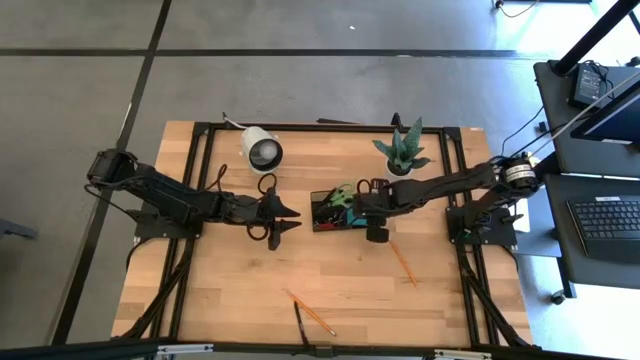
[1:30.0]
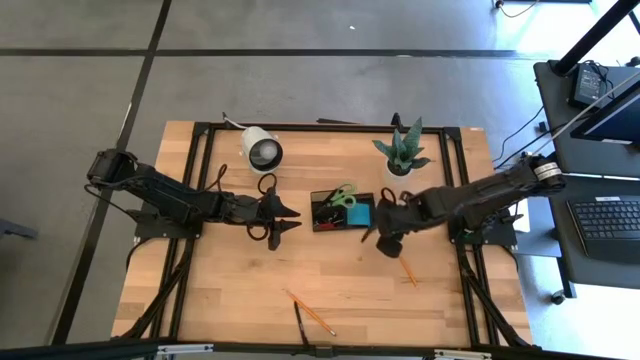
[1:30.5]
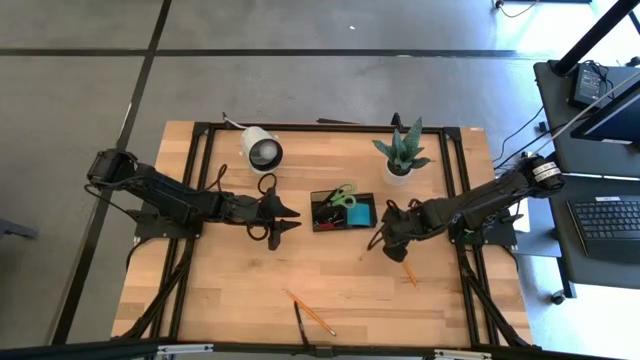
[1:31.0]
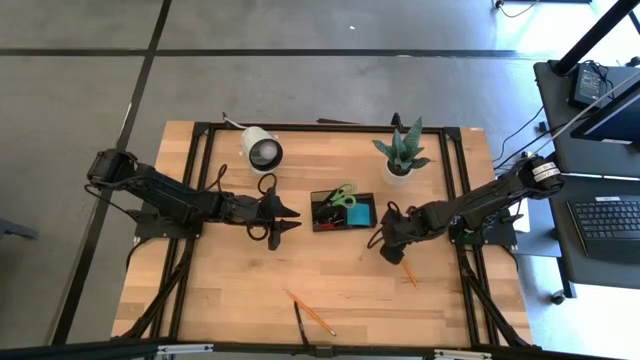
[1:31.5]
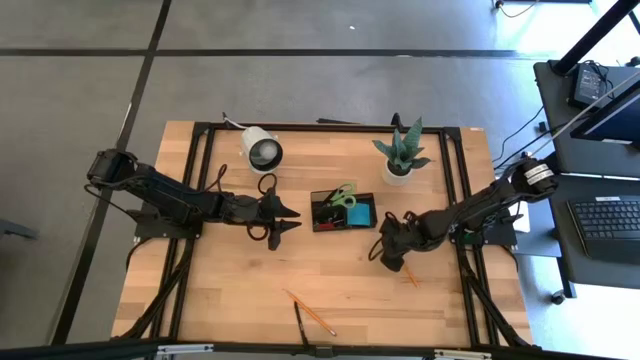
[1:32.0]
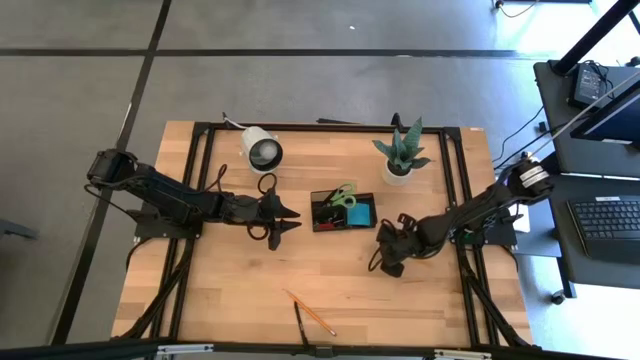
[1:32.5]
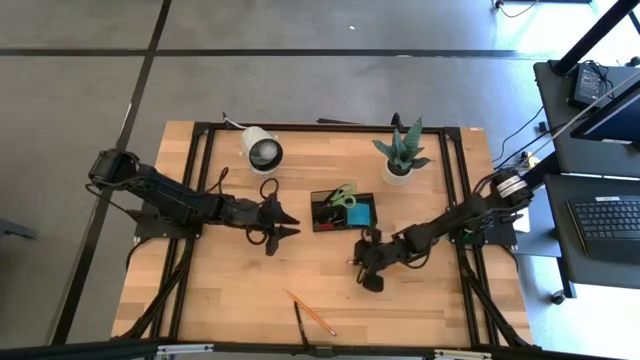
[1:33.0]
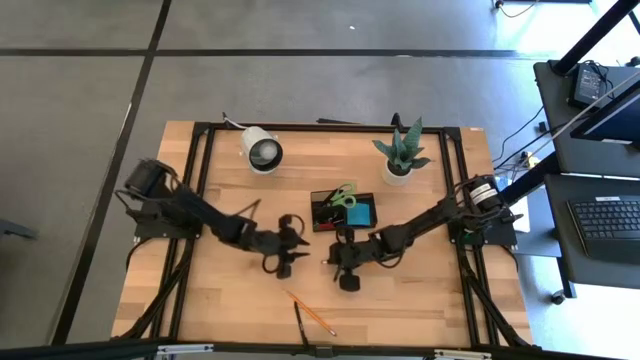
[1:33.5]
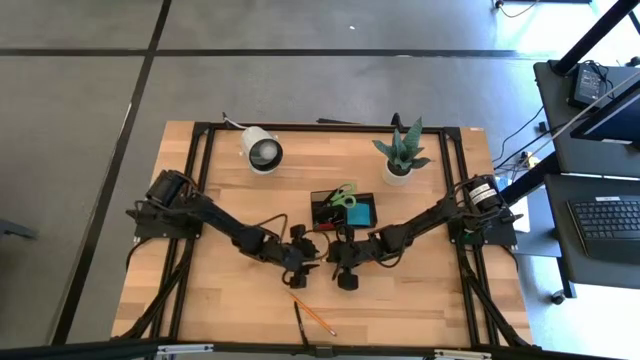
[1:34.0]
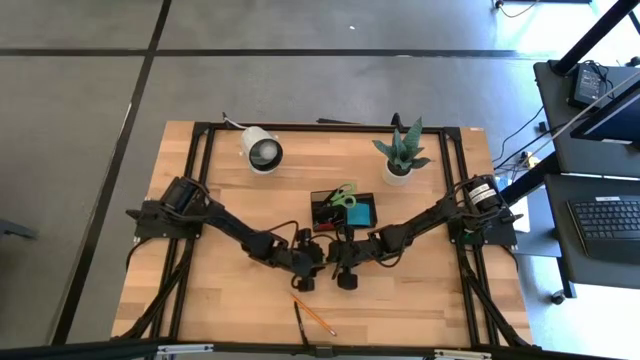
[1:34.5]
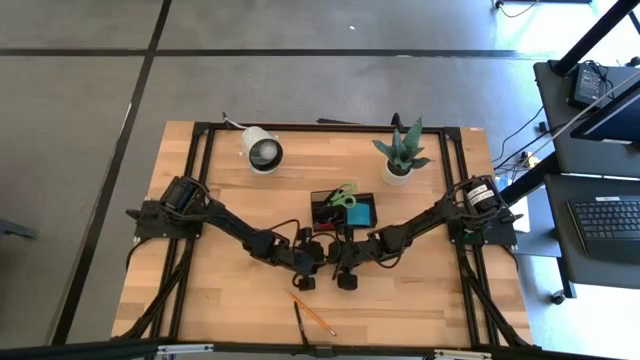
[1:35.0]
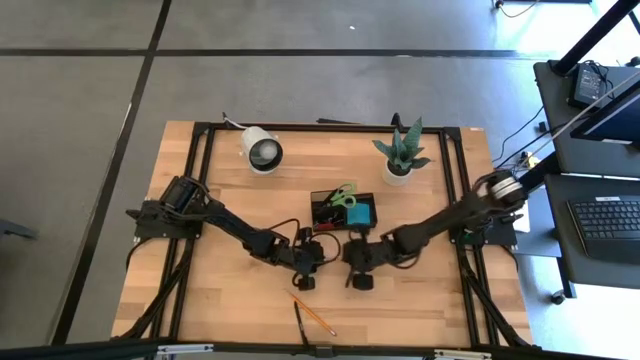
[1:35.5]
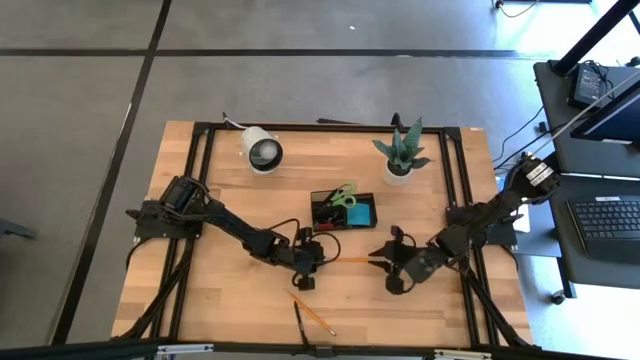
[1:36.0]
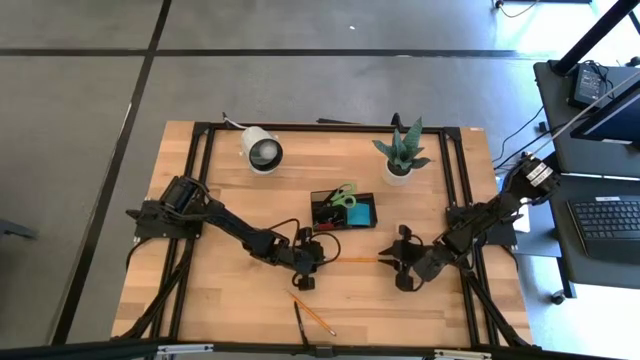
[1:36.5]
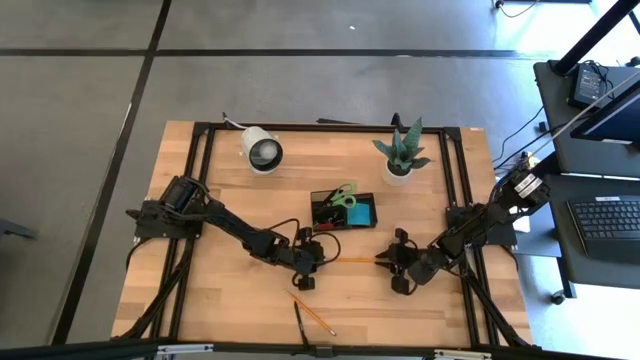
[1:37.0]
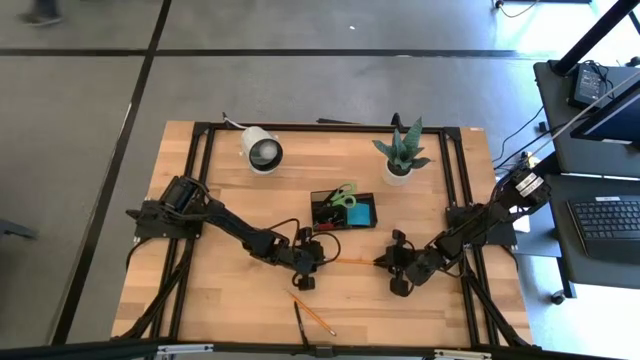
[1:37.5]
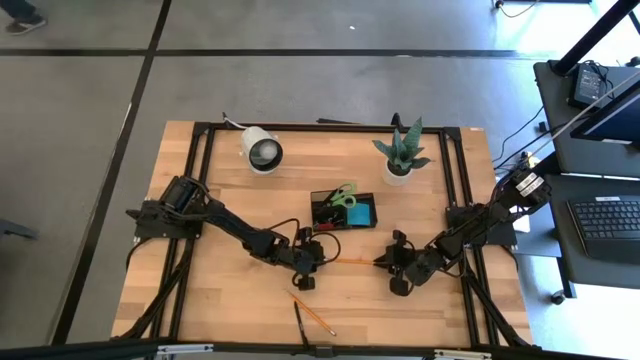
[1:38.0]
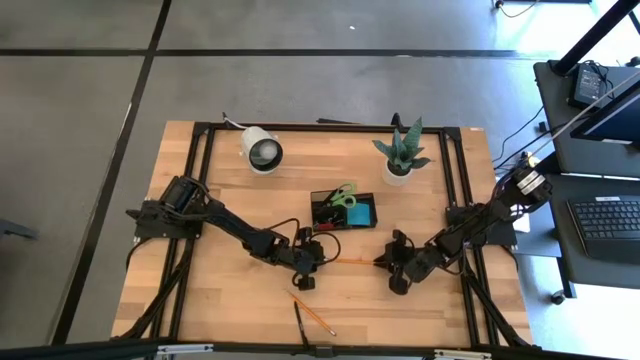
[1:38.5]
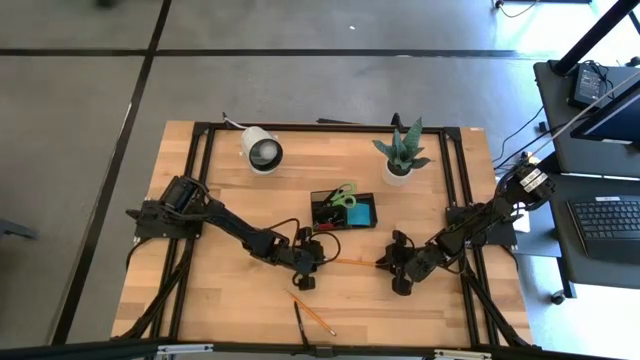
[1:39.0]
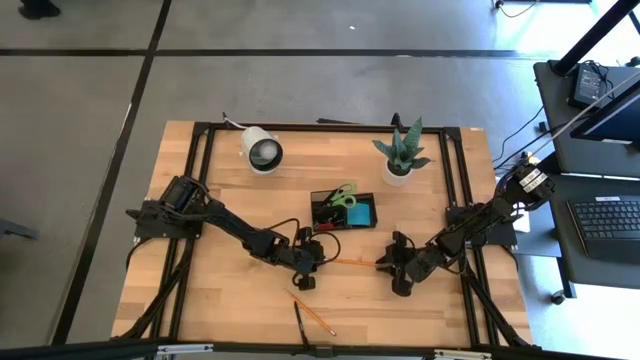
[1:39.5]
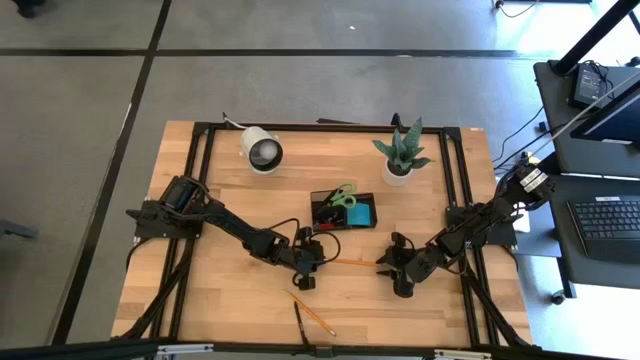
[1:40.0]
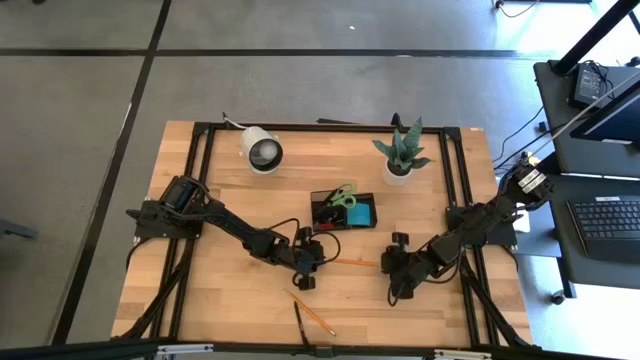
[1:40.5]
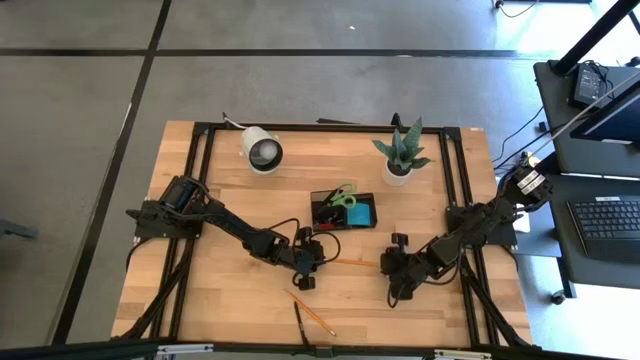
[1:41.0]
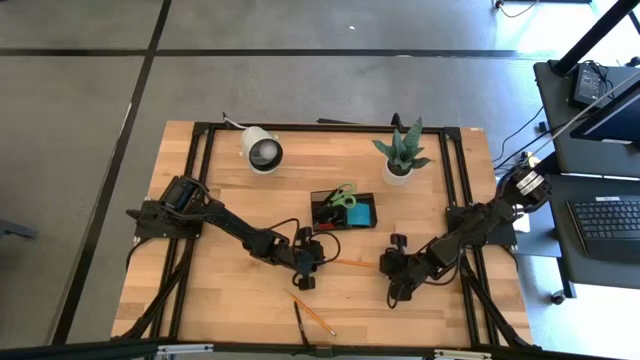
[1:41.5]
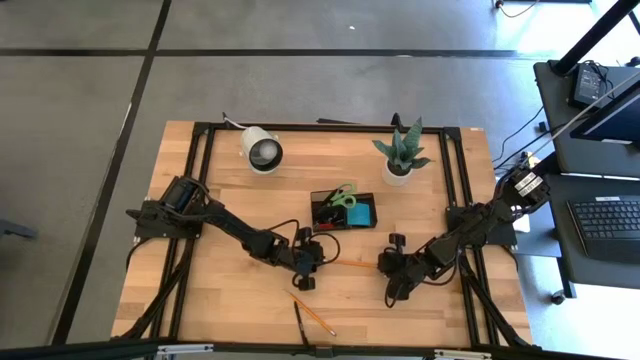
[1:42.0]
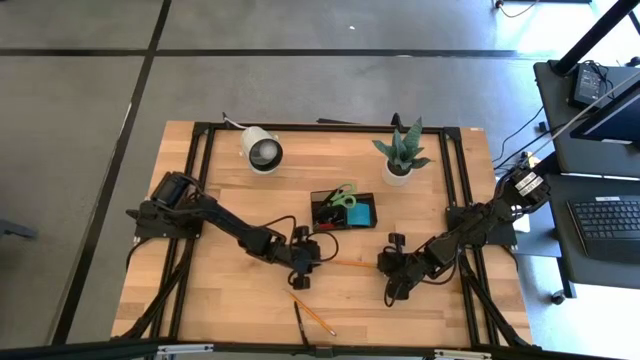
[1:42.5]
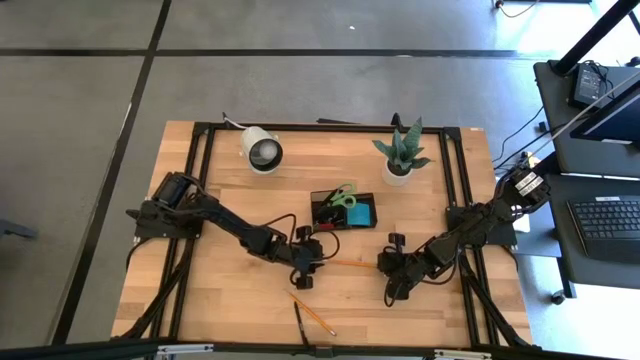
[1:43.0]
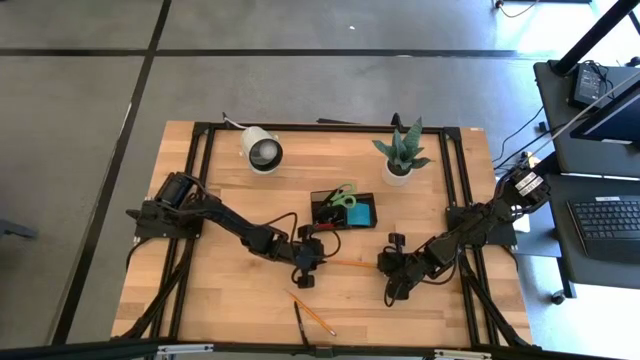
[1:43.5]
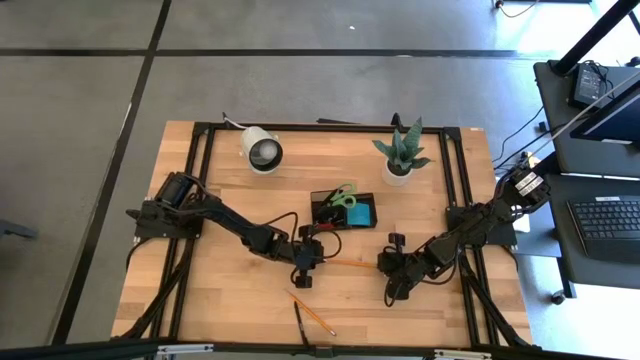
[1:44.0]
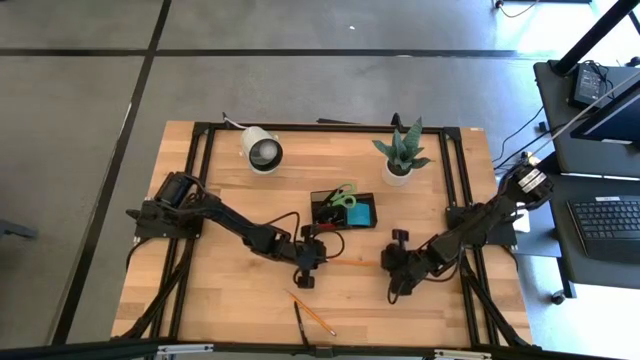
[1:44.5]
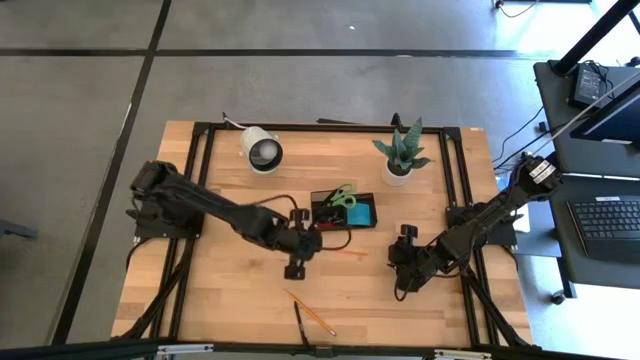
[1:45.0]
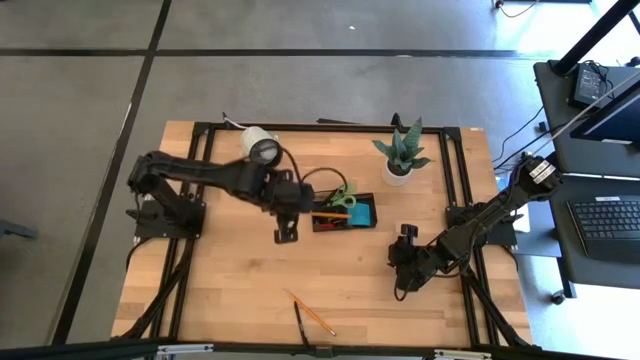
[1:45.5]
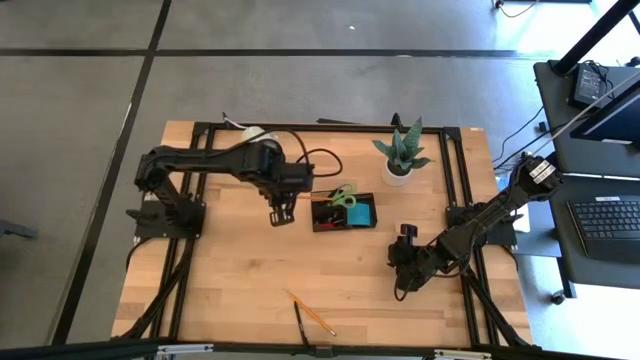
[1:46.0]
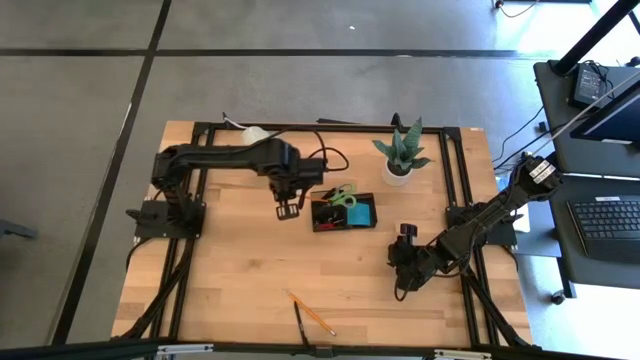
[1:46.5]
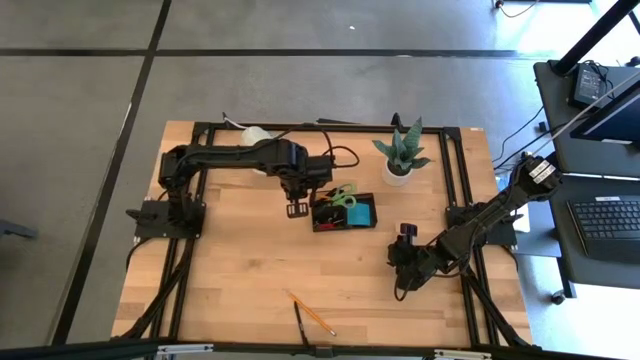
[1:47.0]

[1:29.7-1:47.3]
Task: Pick and place office supplies into organizer
Put the top orange pencil in the desk organizer

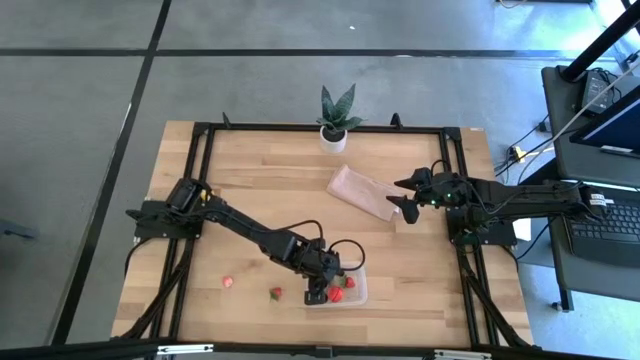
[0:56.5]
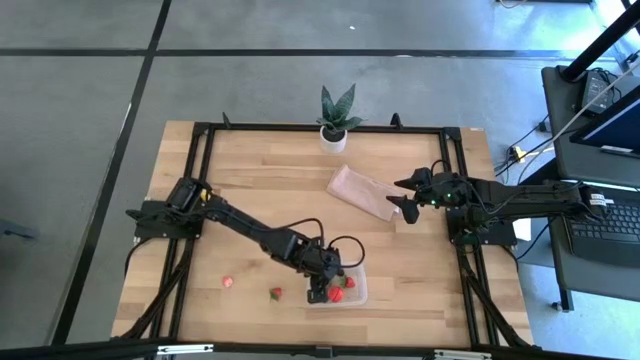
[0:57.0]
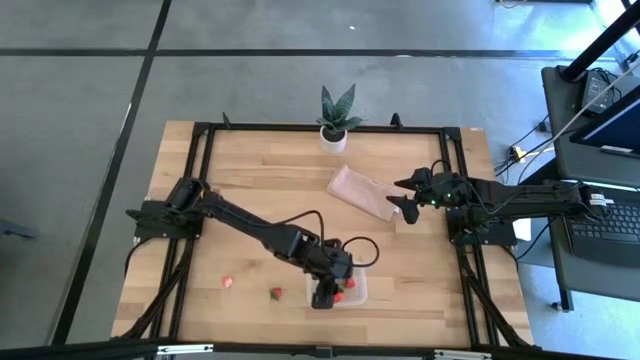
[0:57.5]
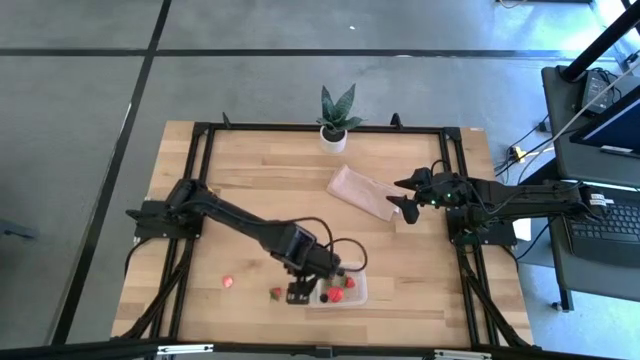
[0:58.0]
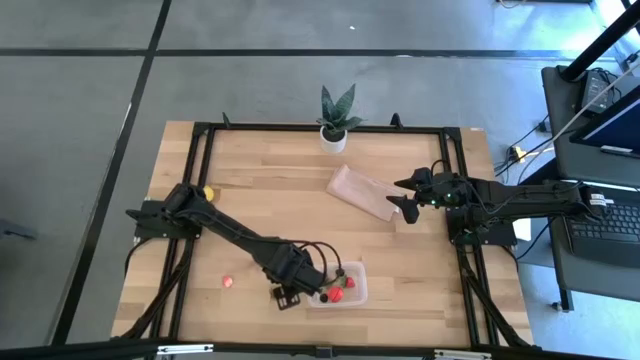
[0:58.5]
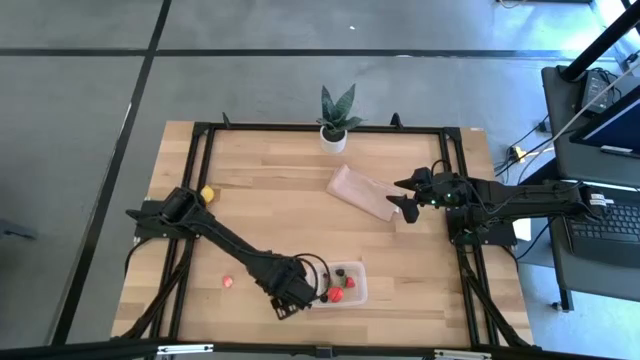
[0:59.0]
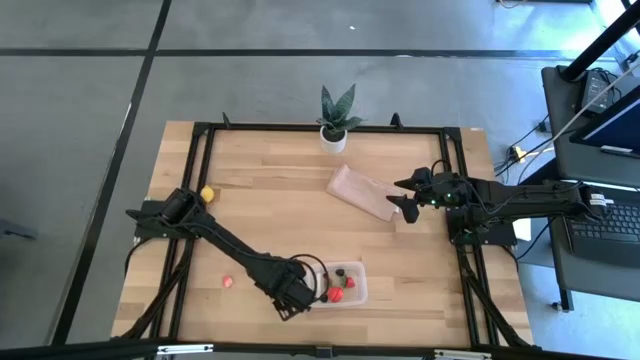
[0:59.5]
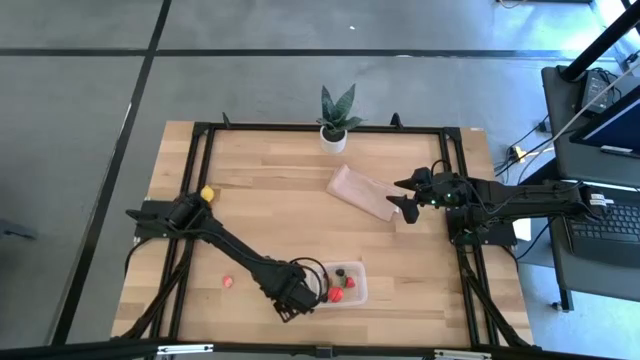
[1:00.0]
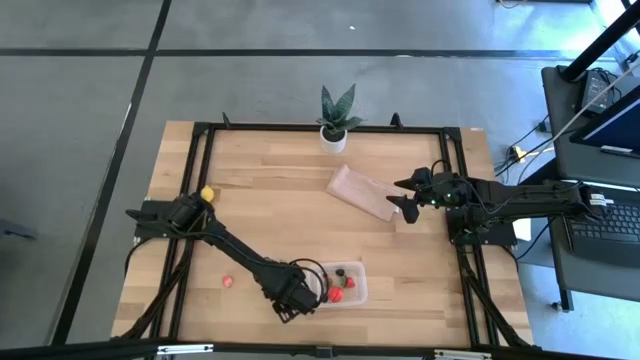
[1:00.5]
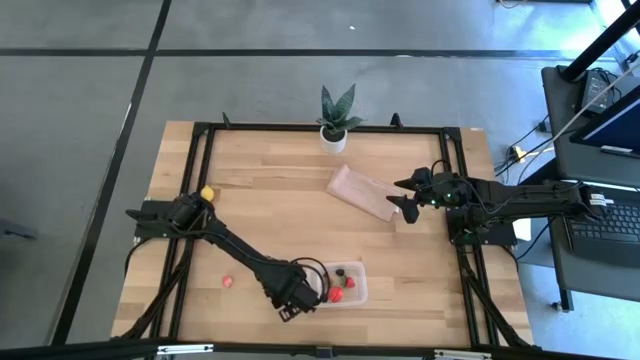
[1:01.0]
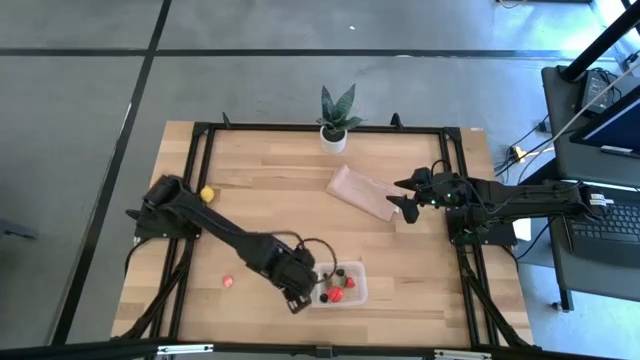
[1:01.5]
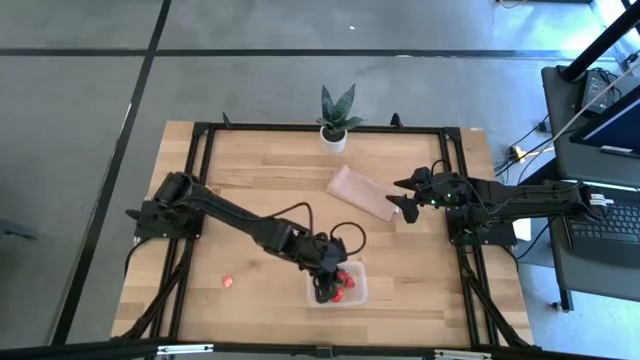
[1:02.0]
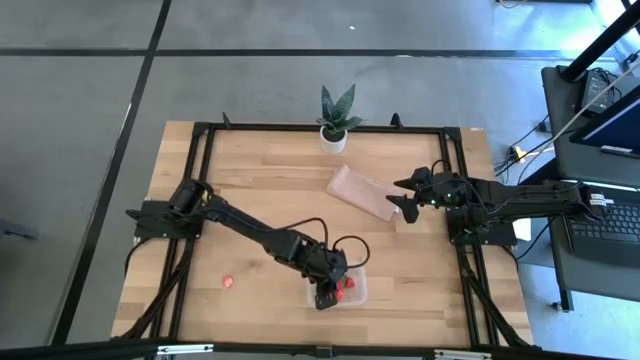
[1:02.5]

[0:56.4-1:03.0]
Task: Pick and placing Produce into tupperware
Put the red strawberry in the bin
